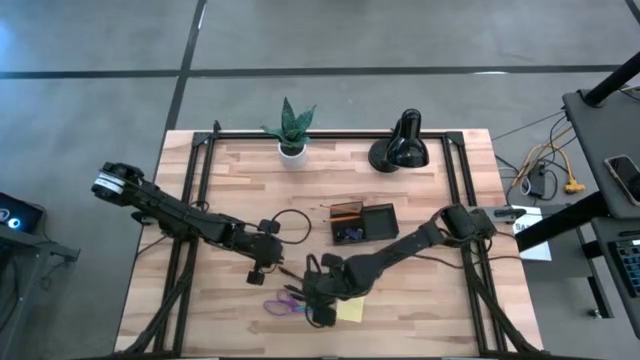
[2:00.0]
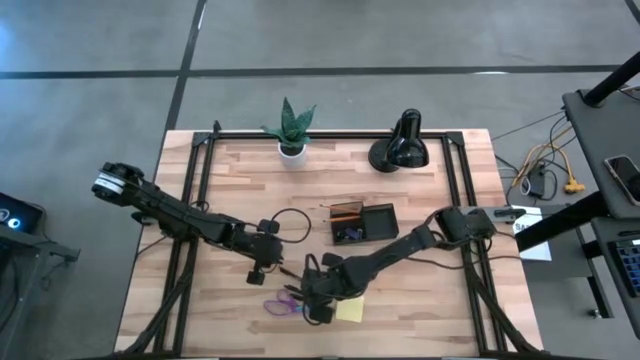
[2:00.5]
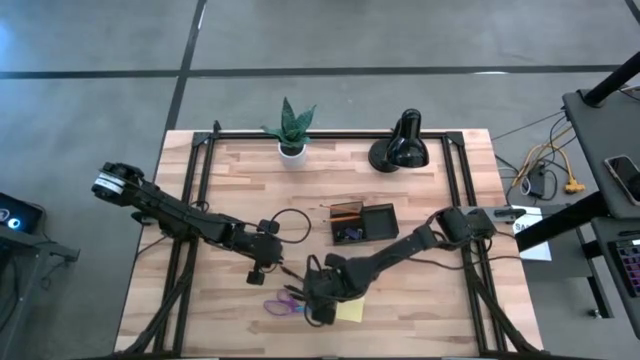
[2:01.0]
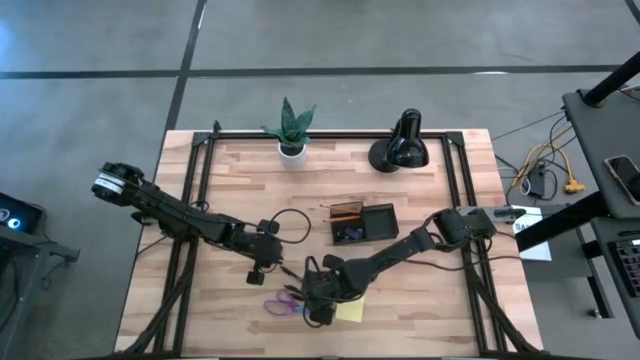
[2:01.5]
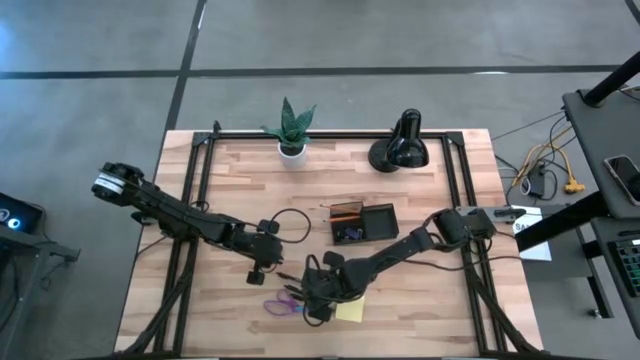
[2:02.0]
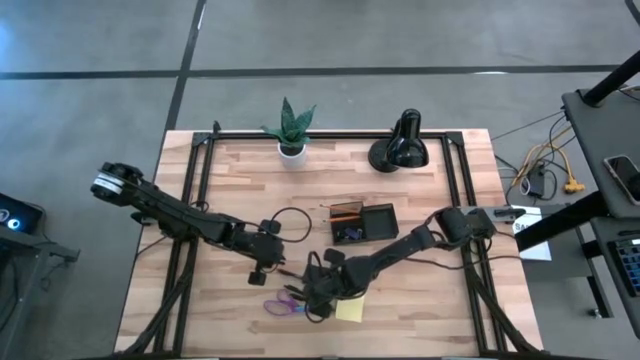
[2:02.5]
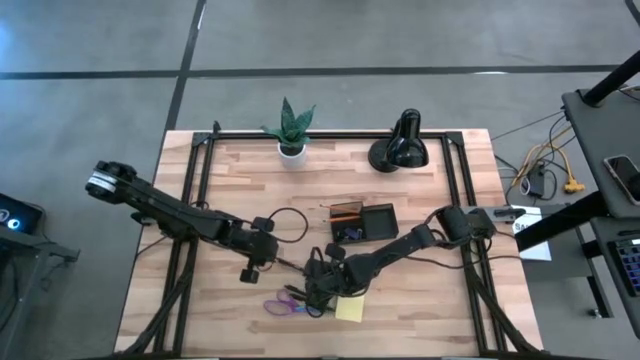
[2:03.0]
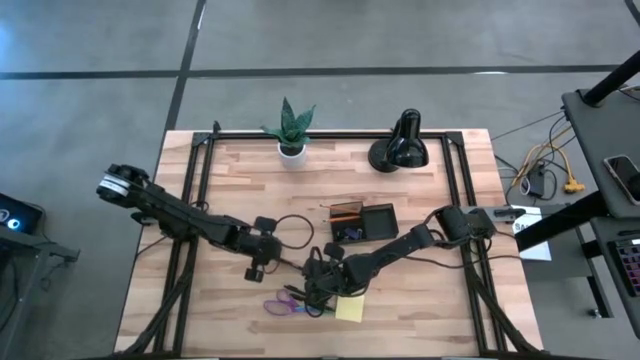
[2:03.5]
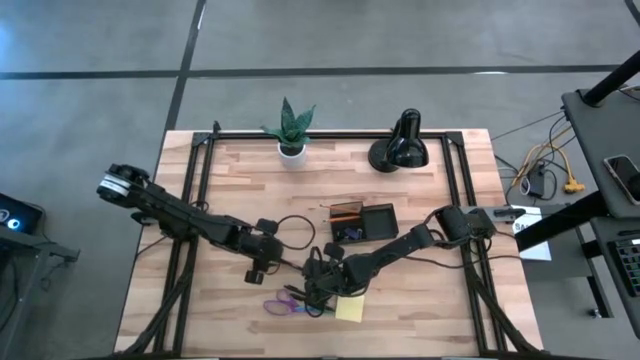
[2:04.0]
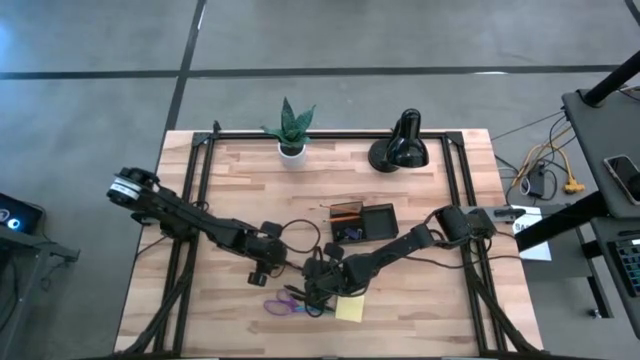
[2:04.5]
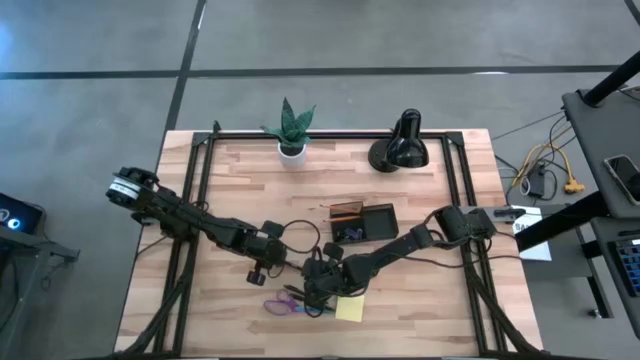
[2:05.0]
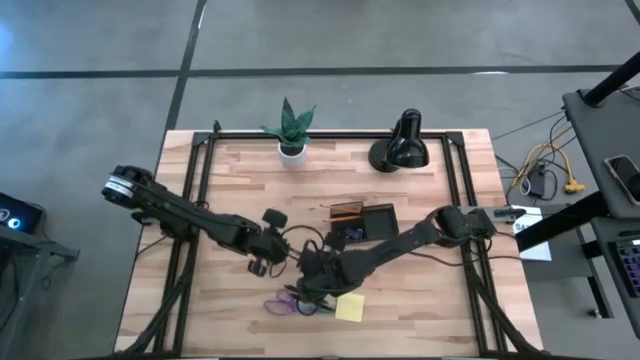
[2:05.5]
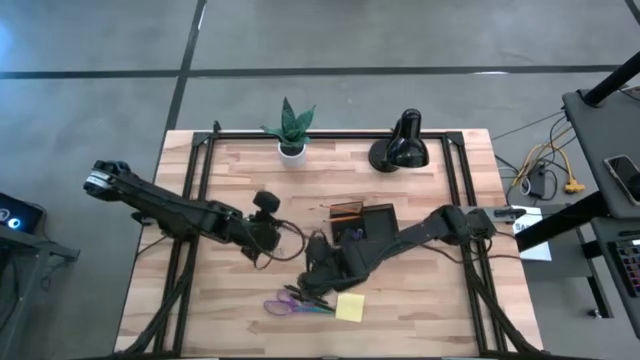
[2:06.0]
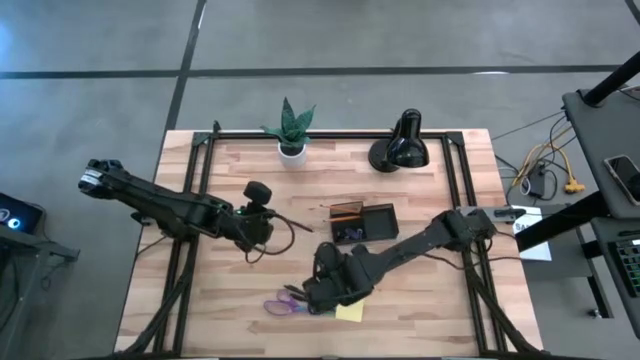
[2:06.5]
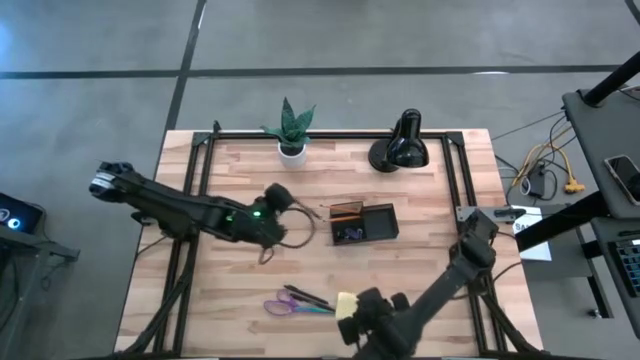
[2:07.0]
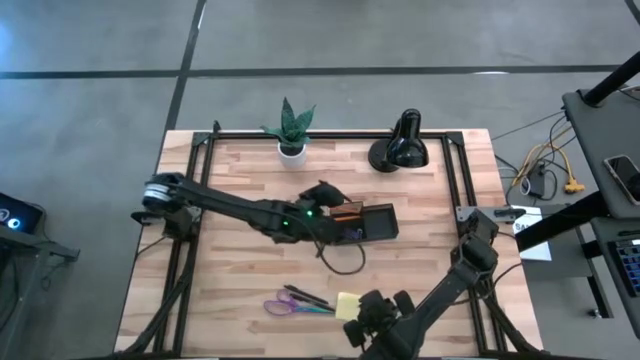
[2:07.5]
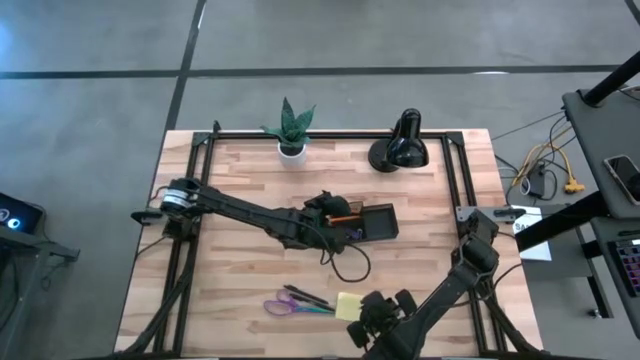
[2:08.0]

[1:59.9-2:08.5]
Task: Pick and place office supplies into organizer
Put the top black ballpen into the black desk organizer

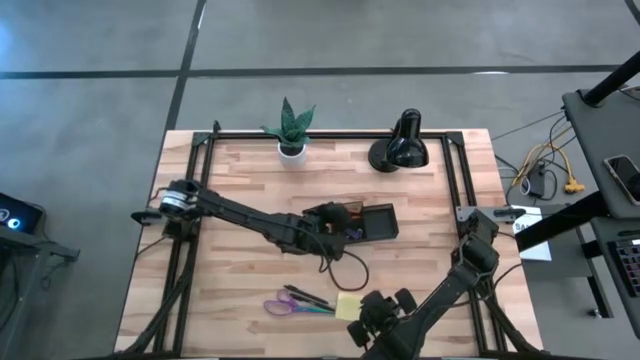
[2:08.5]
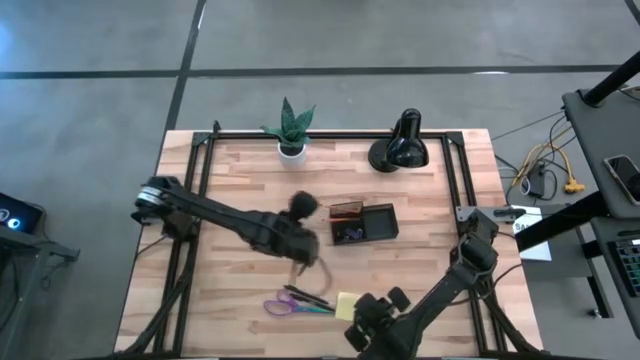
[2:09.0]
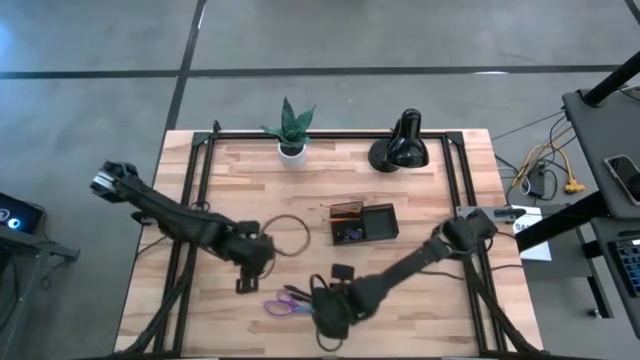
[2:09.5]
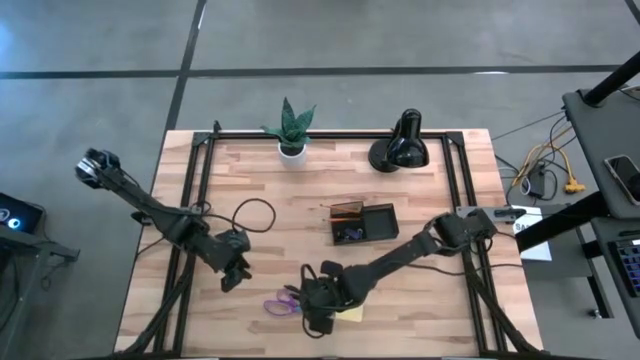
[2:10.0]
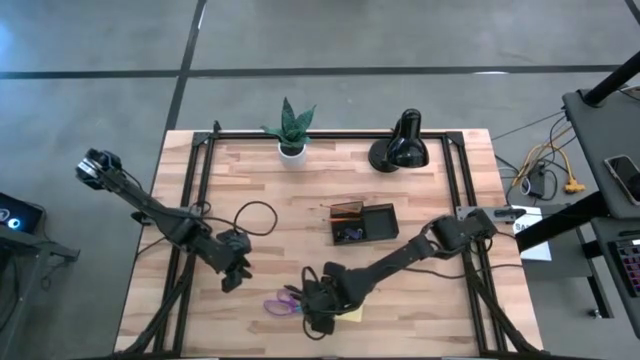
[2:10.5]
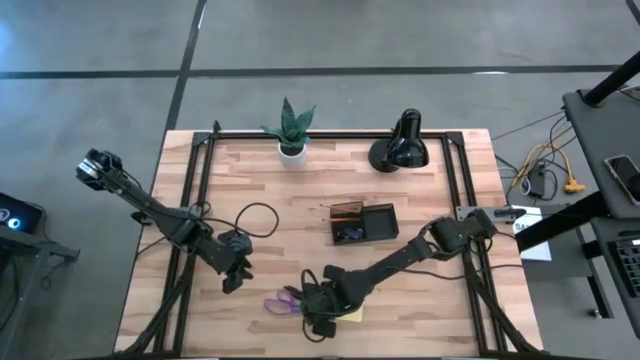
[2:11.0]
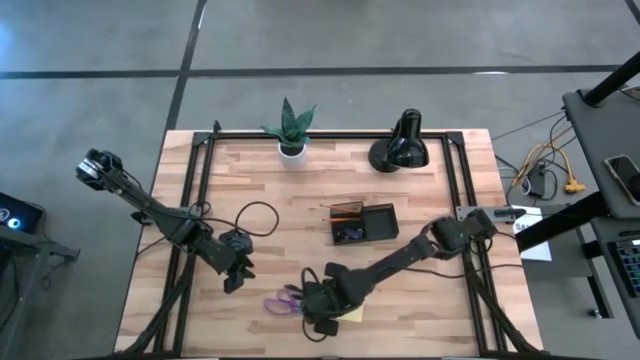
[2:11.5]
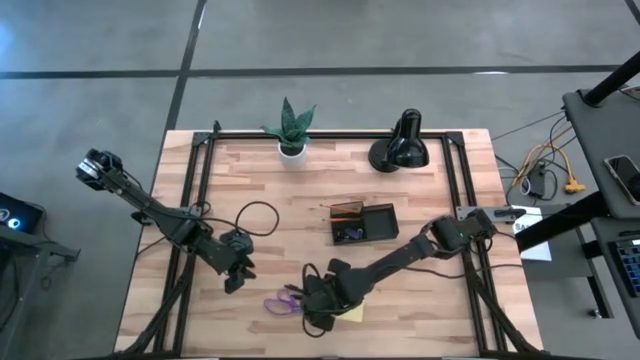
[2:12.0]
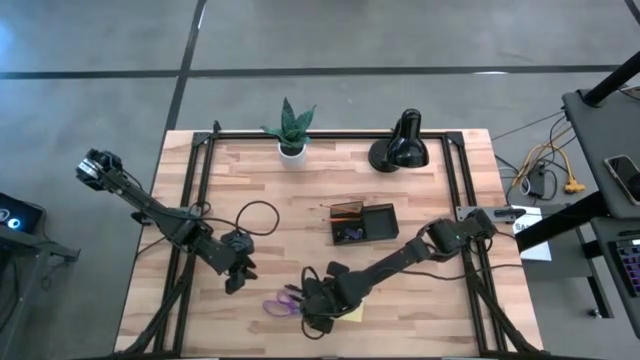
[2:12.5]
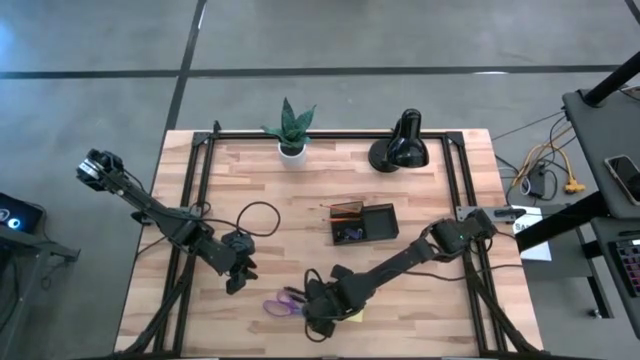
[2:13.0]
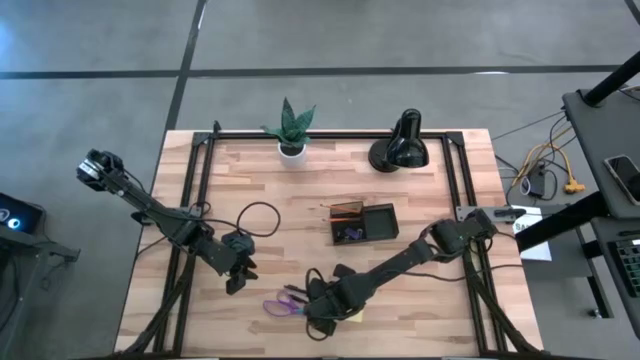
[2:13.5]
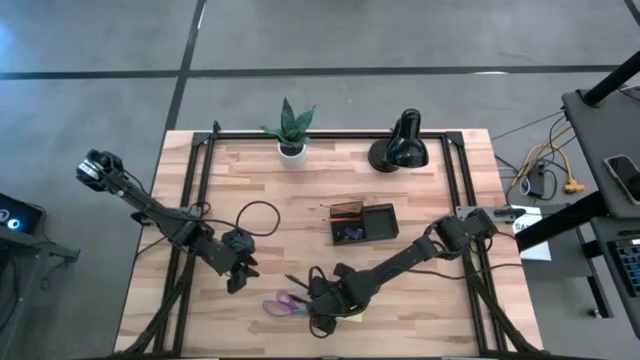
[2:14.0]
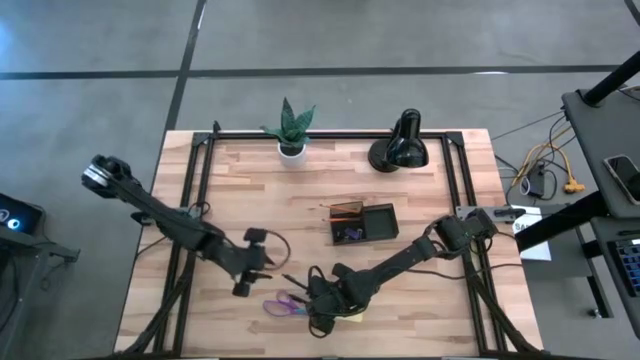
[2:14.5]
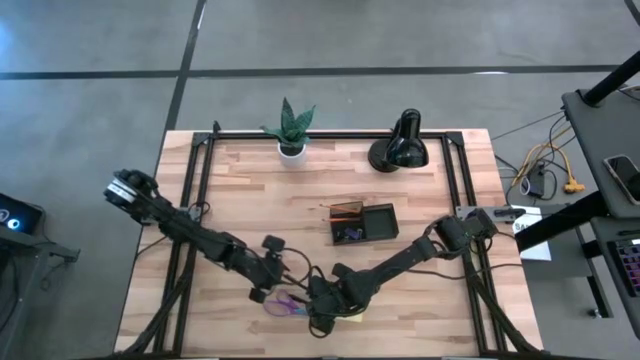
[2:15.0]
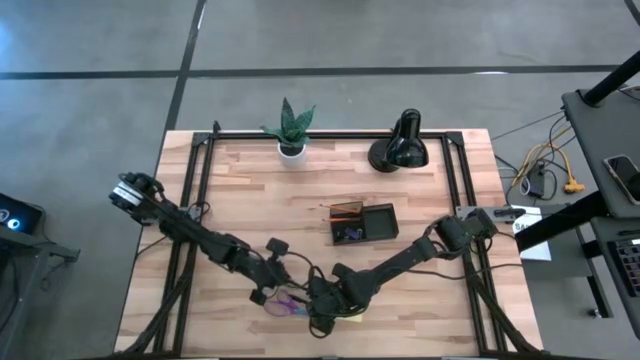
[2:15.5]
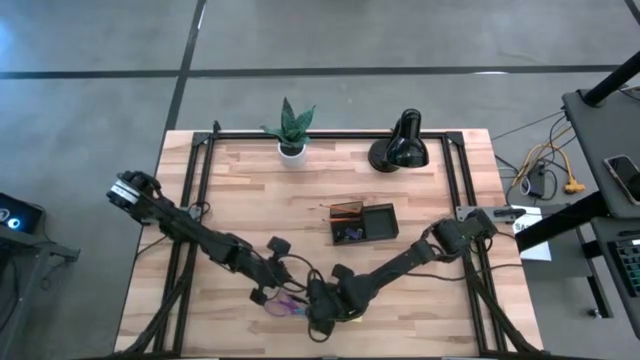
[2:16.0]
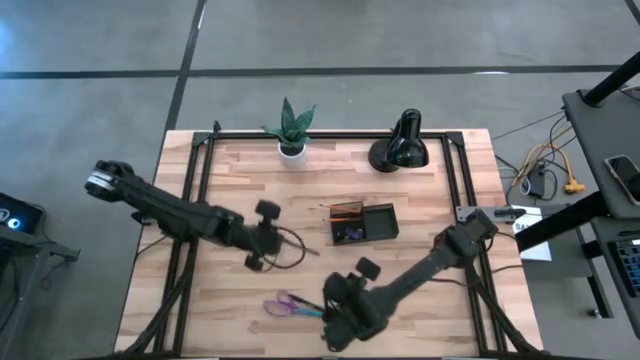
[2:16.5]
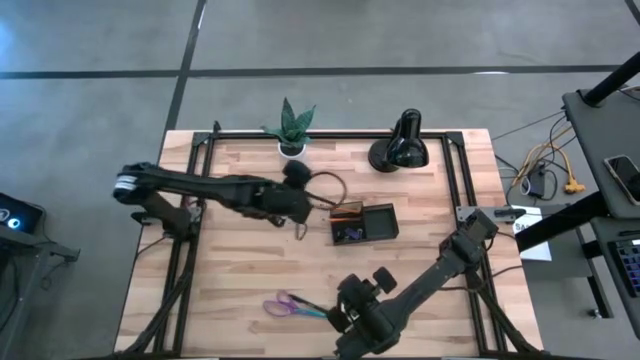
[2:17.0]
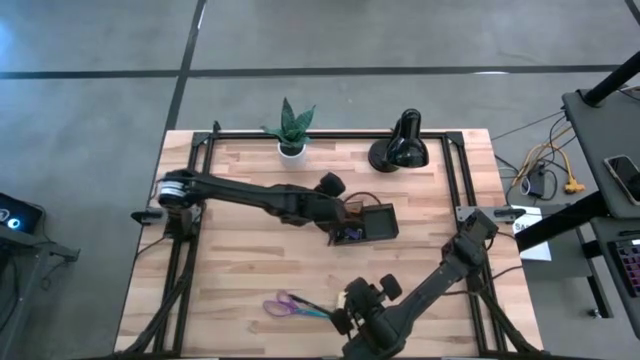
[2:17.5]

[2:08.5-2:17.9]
Put the top black ballpen into the black desk organizer

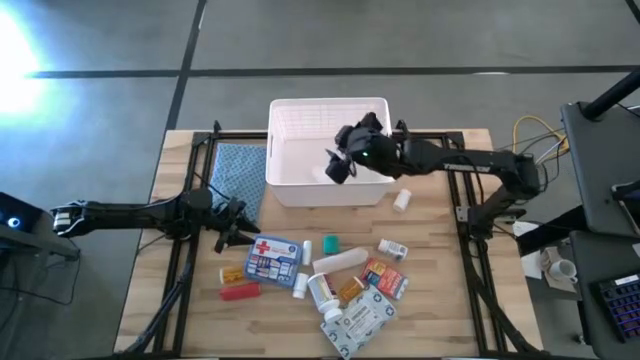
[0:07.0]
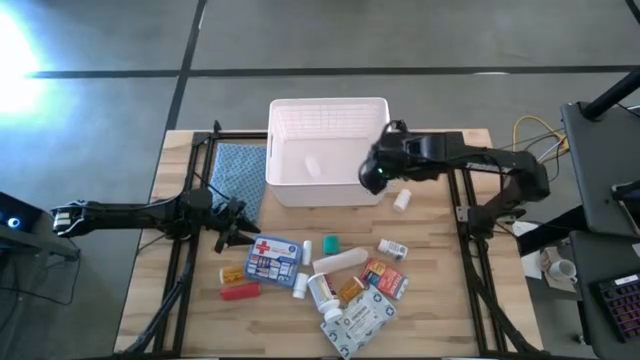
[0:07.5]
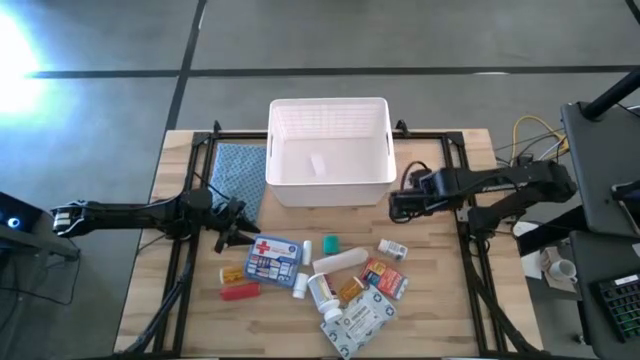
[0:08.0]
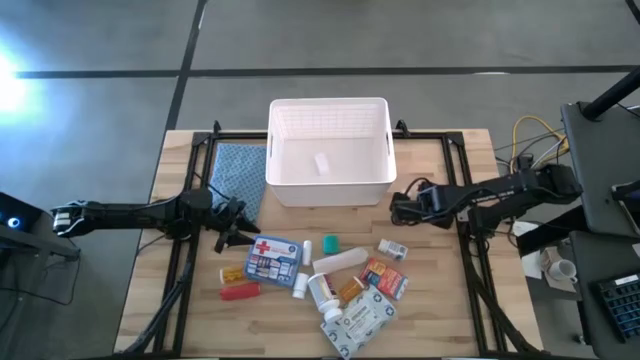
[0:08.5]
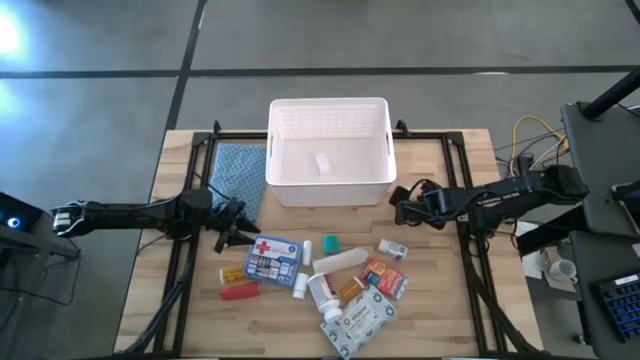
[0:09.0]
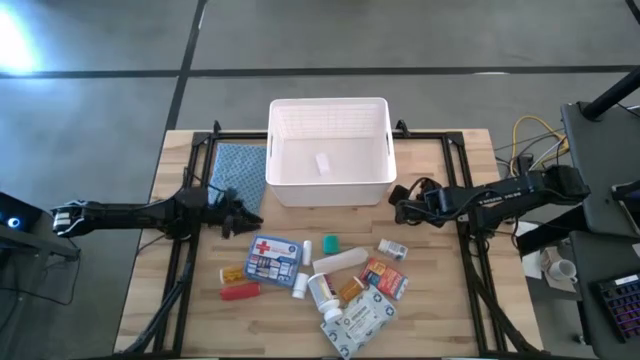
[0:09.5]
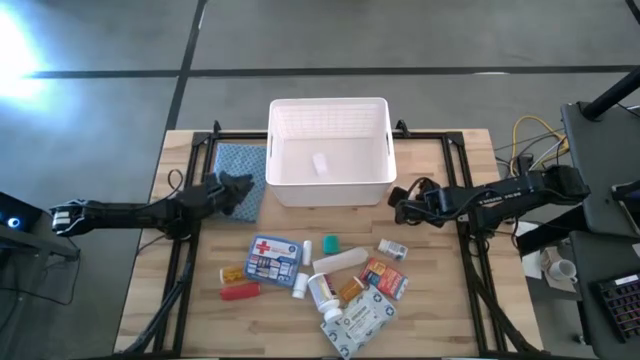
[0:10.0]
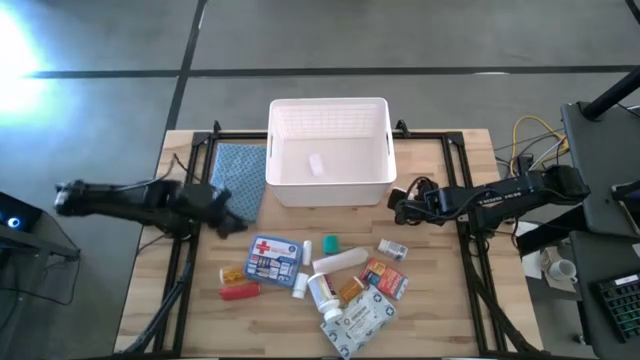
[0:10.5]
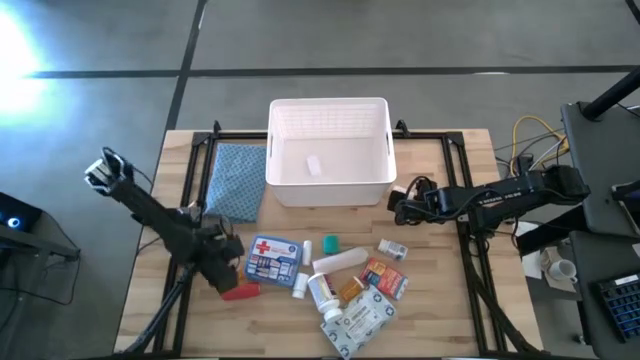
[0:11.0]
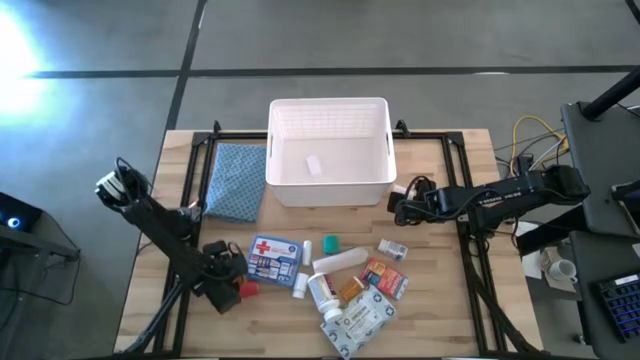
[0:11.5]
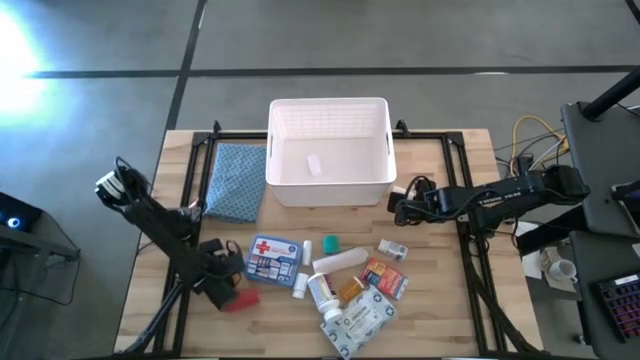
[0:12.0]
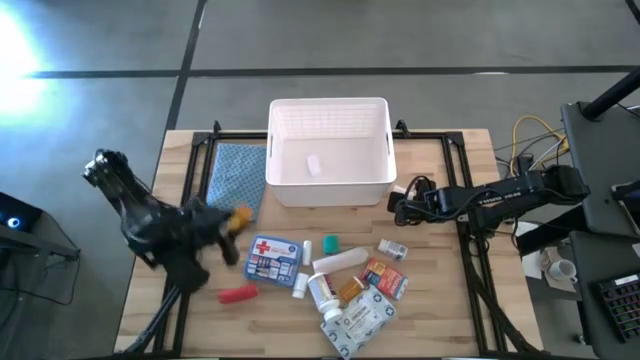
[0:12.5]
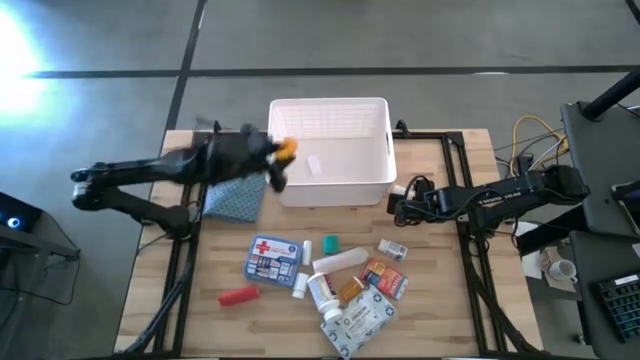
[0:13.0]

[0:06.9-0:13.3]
Task: Pick & place medical supplies in basket/bin
Put the yellow pill bottle into the white bin
